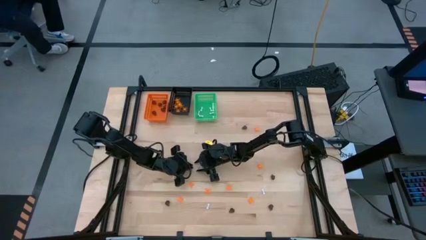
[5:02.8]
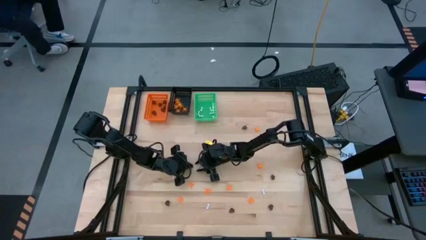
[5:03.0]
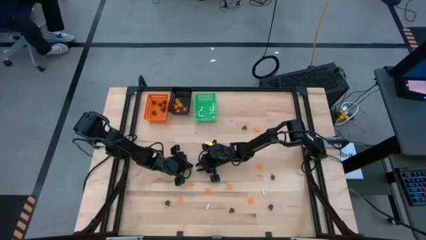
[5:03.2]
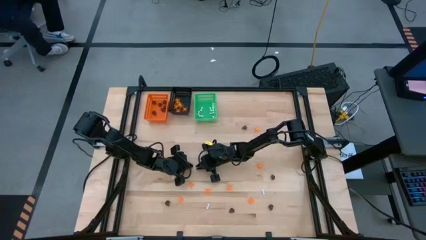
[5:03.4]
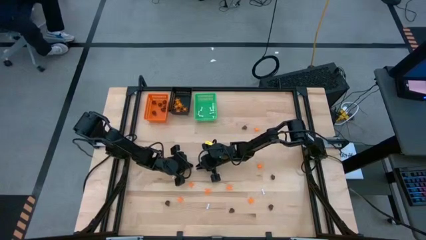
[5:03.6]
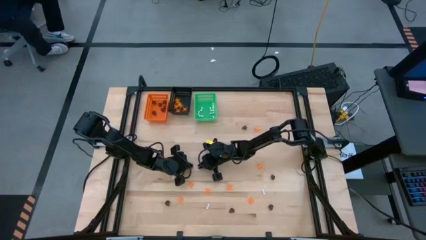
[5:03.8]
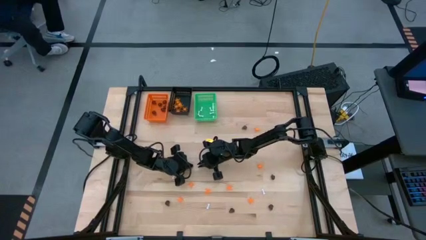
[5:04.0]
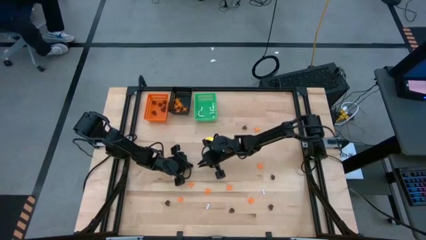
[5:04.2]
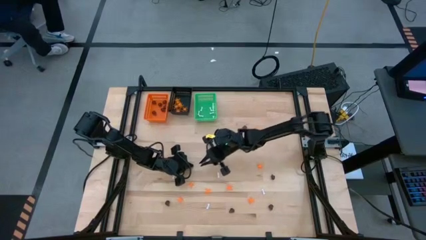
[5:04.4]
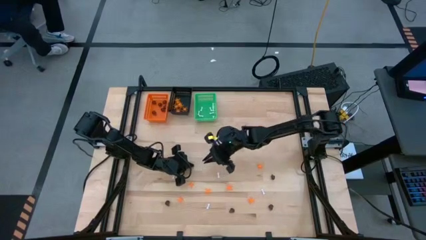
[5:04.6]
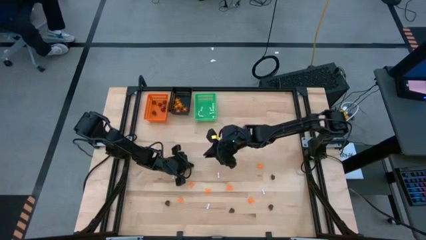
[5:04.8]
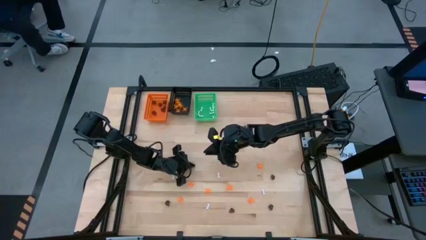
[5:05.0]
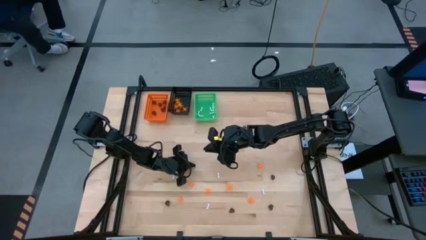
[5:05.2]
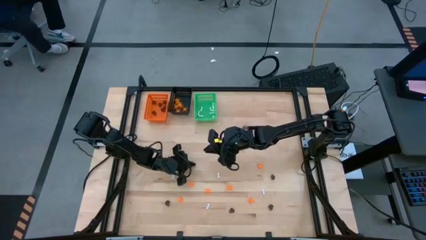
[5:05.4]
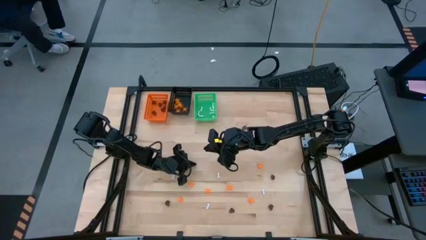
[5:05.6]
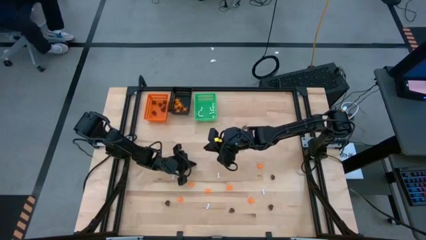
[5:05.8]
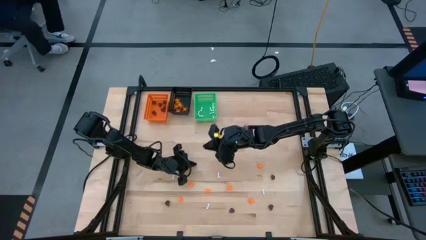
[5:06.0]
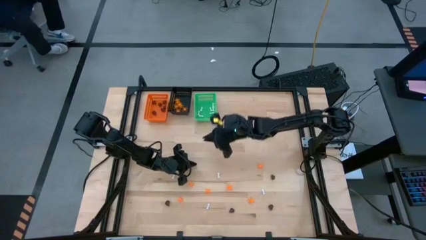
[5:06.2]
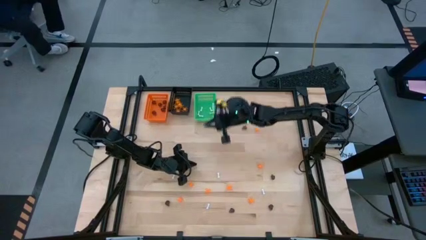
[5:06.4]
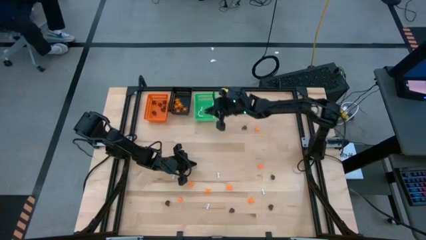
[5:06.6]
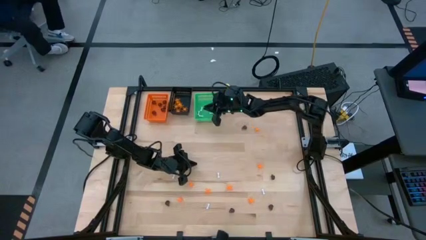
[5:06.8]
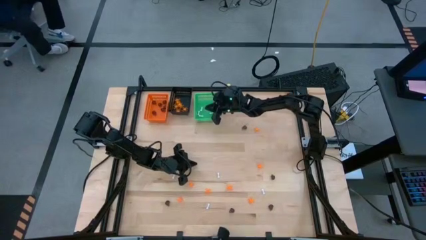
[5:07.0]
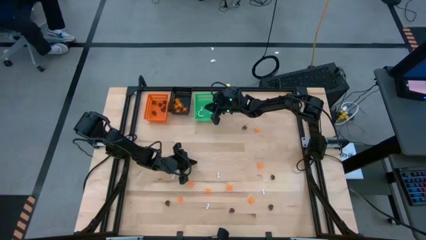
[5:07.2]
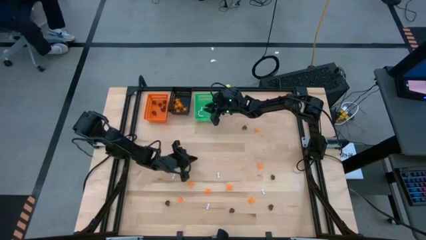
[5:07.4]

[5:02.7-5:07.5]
Task: Sort Halloween decoration
Put the white bone toy into the green bin

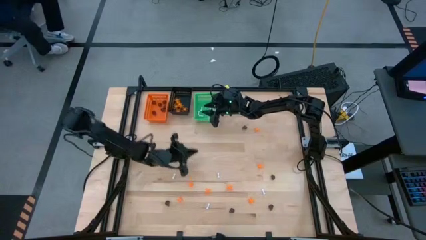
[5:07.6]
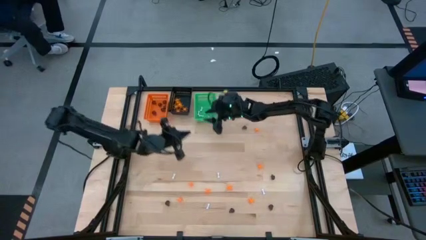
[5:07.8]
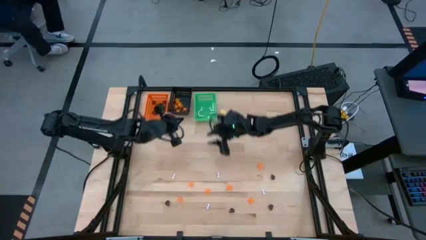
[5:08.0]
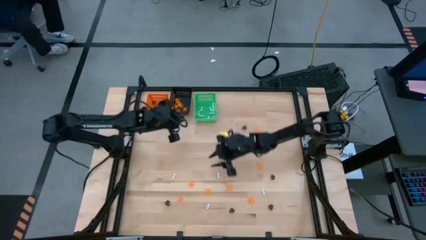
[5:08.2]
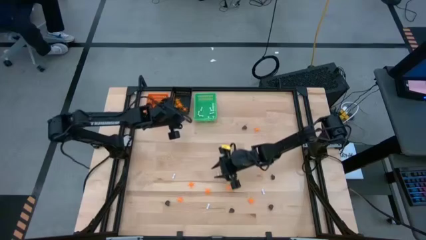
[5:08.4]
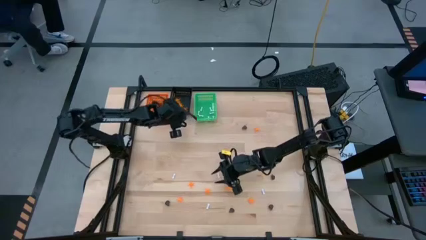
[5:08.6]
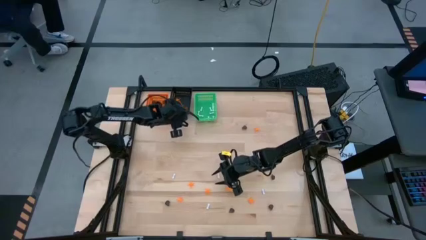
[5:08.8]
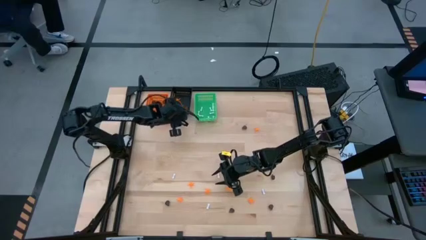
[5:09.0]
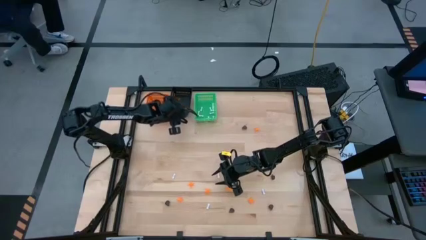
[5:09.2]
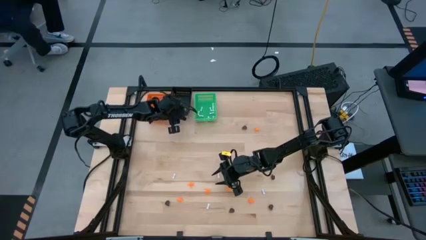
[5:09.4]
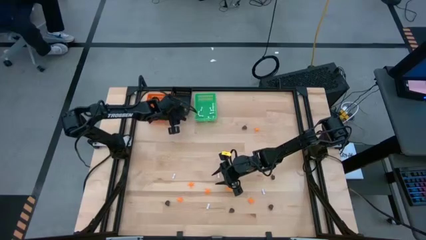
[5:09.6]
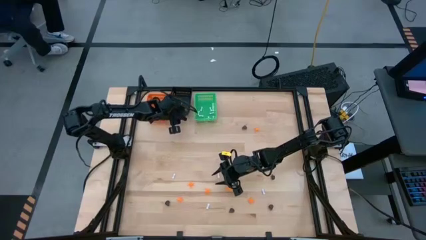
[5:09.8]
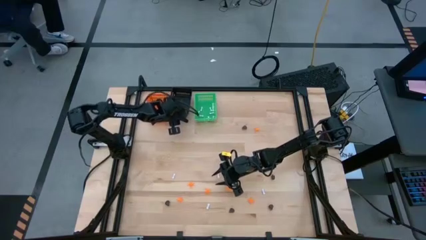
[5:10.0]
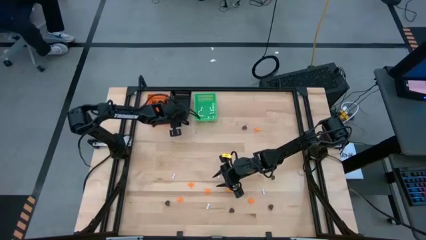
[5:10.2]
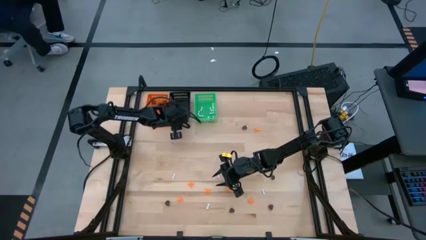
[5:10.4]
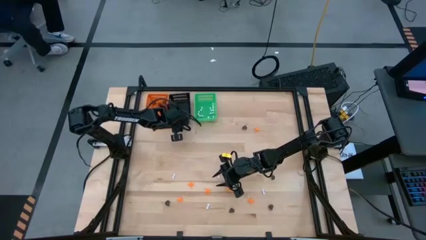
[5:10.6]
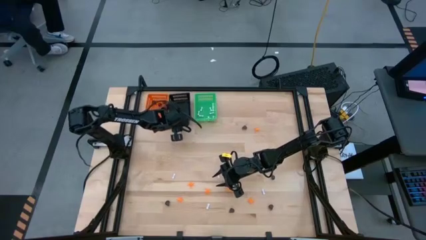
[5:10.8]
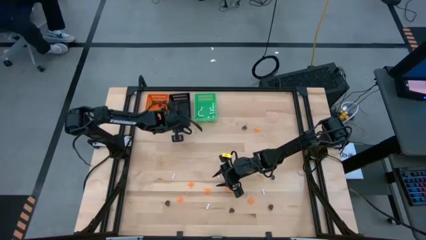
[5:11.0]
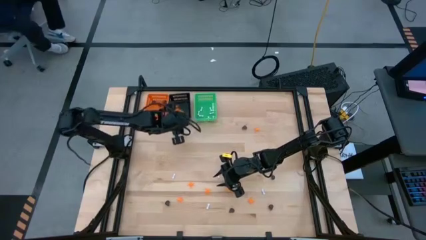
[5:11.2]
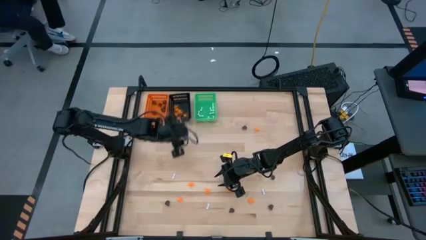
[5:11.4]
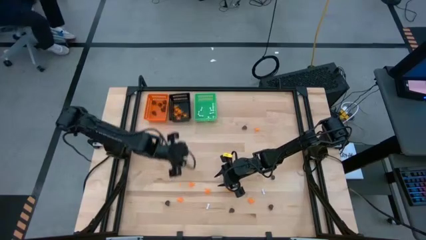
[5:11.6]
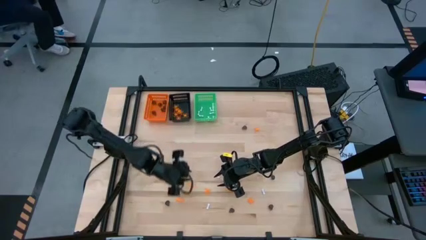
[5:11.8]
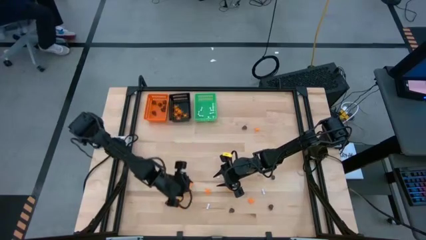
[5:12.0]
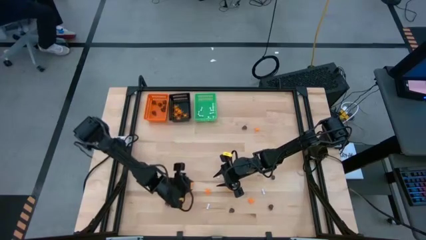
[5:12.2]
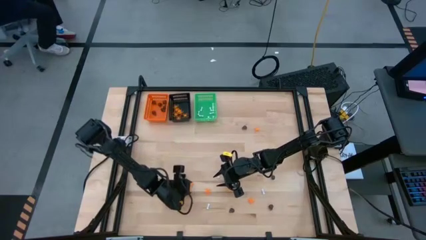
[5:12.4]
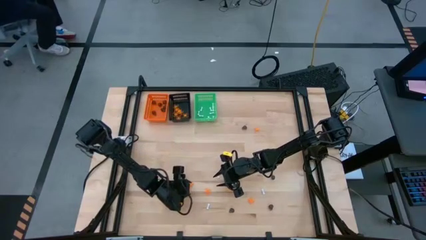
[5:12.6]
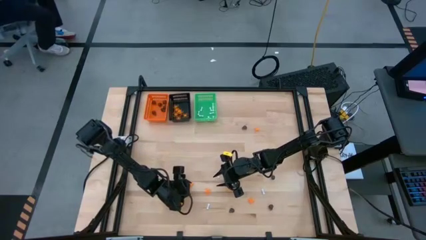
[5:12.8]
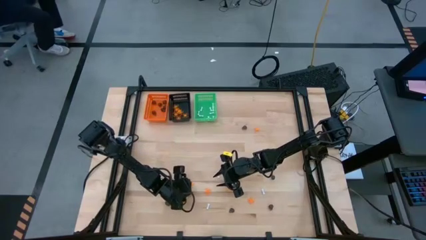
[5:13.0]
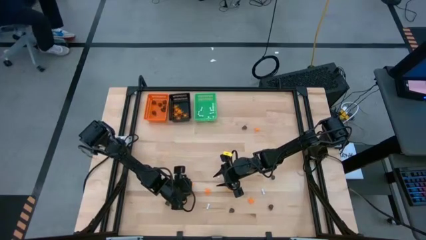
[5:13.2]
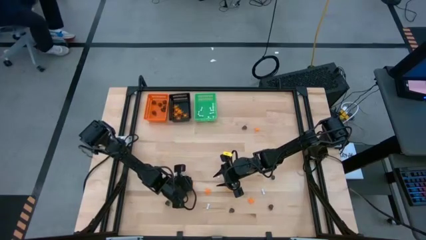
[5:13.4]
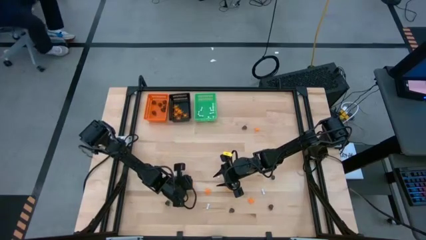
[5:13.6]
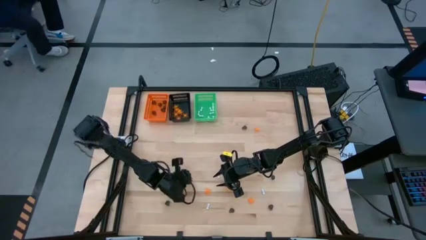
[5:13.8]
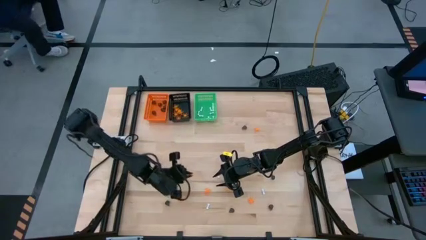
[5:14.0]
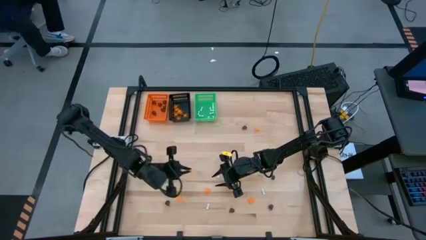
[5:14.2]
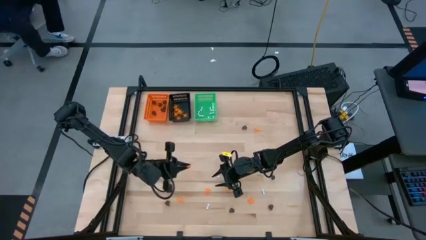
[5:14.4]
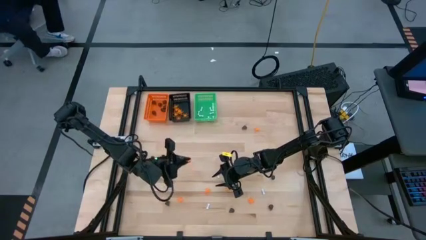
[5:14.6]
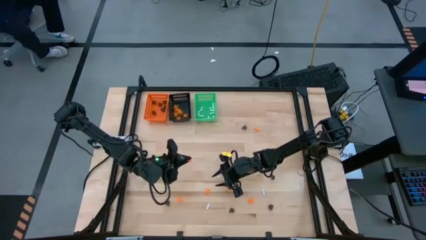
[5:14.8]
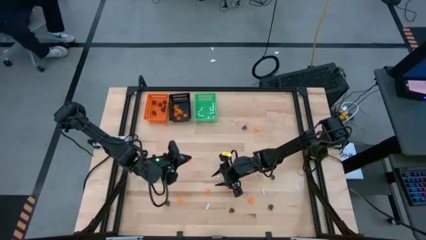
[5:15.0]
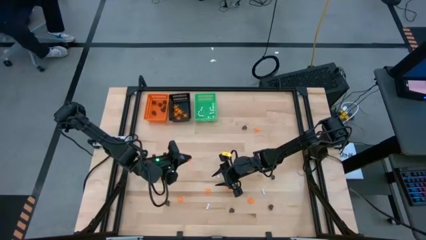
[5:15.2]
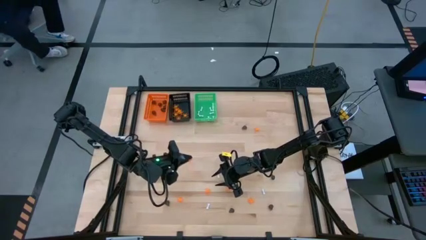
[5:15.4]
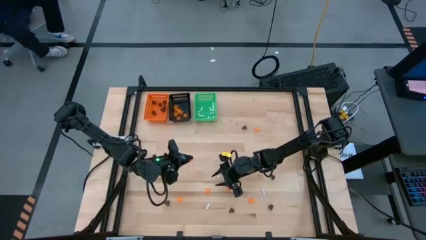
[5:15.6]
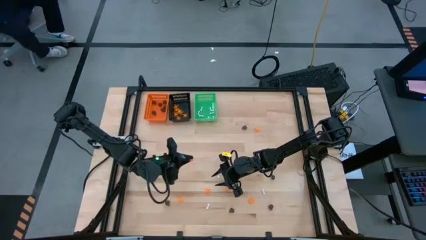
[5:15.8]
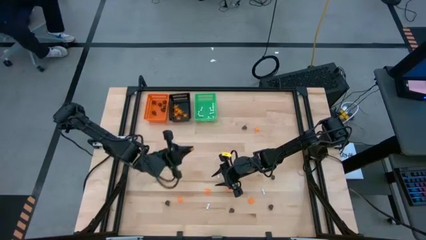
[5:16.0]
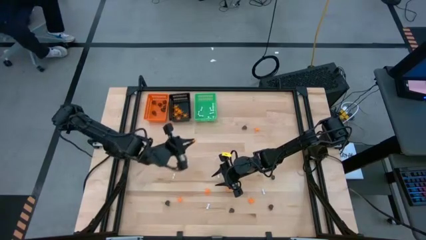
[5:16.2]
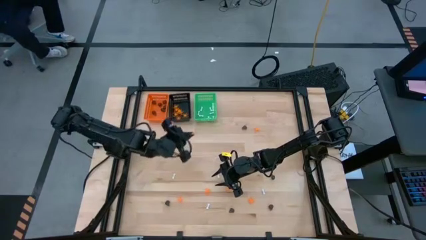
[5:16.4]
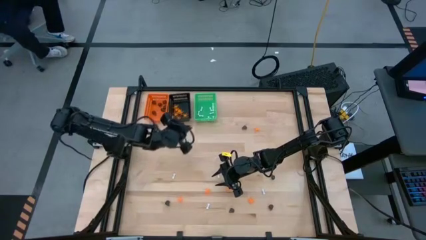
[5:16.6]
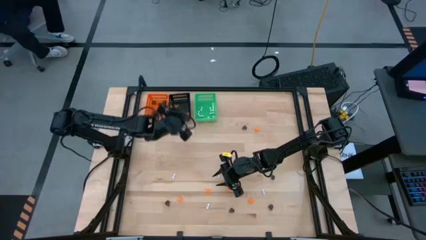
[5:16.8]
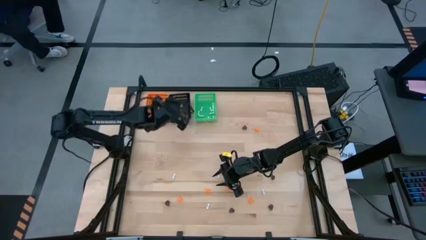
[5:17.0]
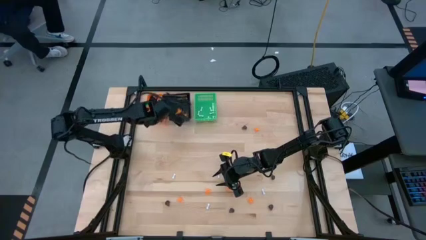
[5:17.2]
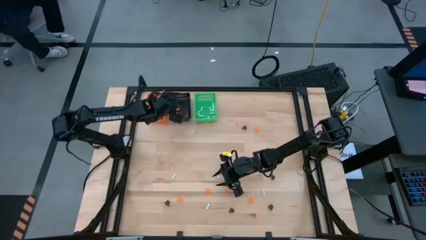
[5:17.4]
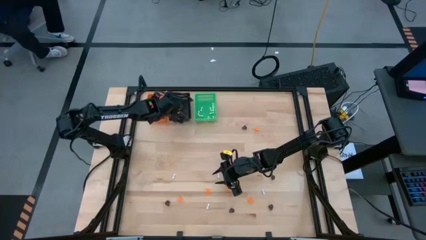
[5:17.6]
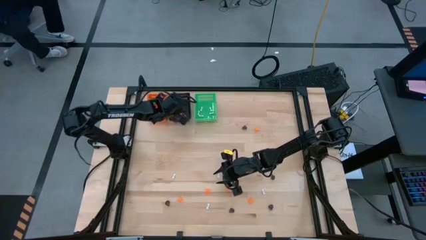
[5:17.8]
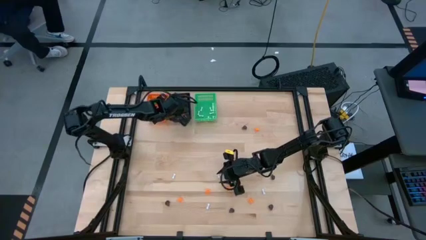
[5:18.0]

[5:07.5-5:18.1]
Put the orange spider toy into the black bin
